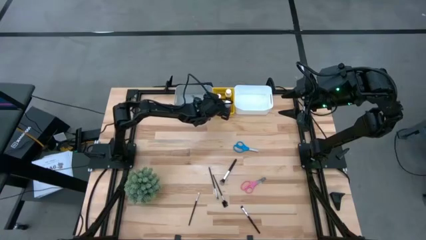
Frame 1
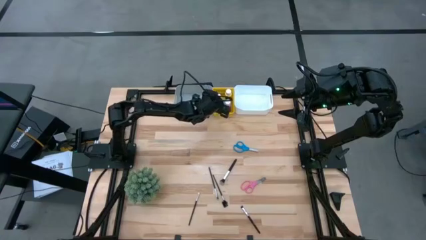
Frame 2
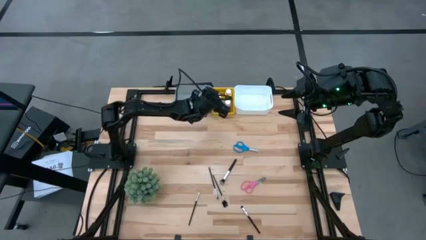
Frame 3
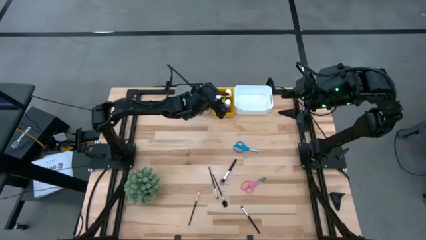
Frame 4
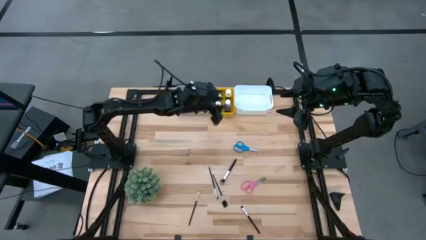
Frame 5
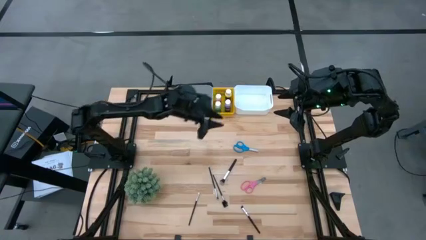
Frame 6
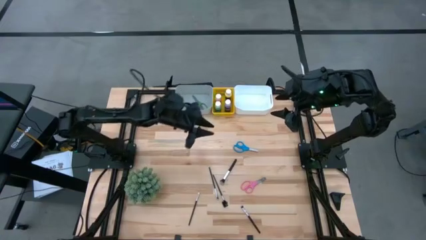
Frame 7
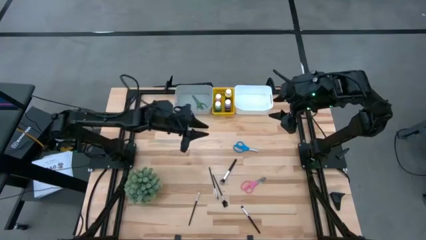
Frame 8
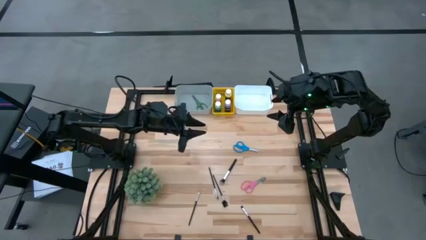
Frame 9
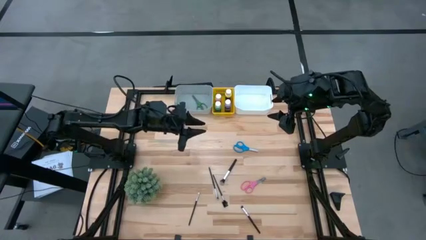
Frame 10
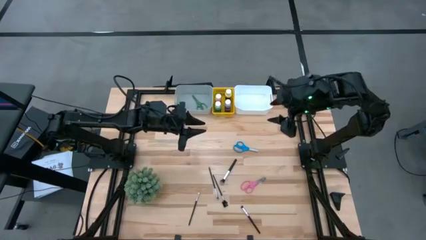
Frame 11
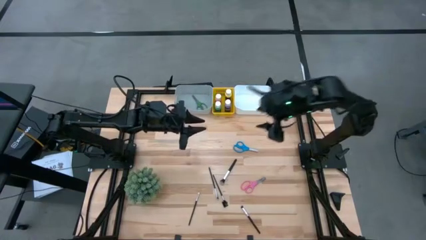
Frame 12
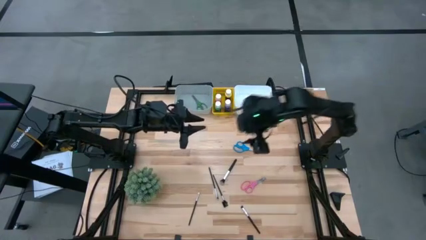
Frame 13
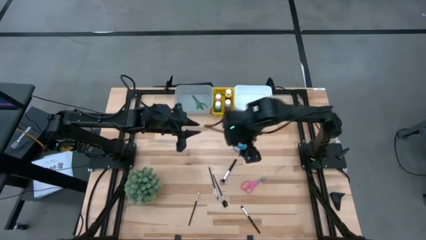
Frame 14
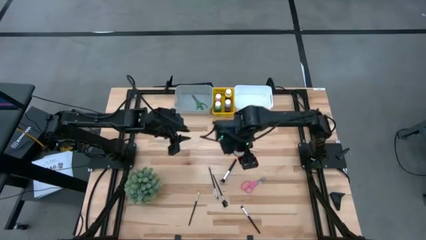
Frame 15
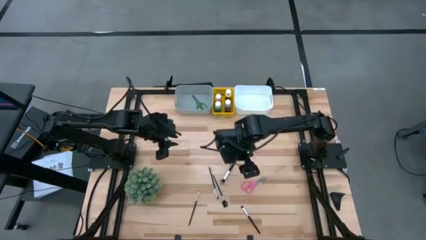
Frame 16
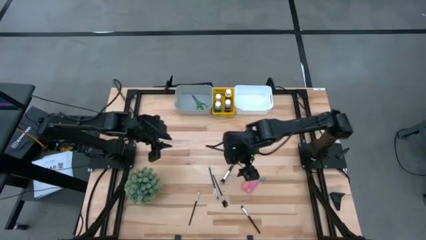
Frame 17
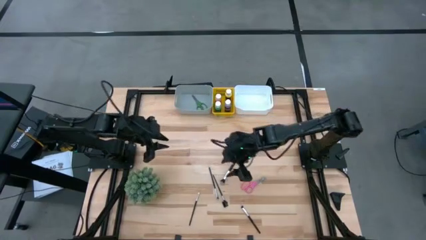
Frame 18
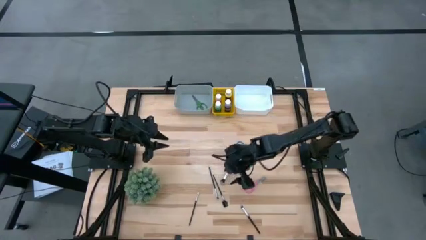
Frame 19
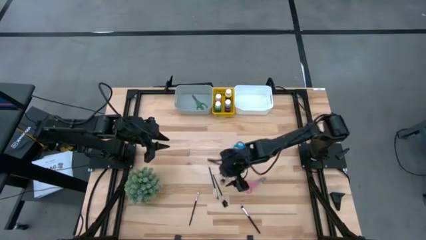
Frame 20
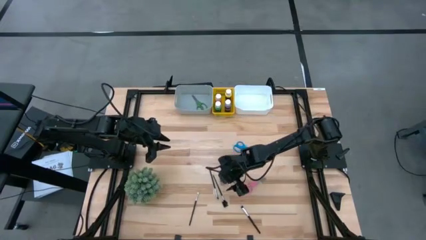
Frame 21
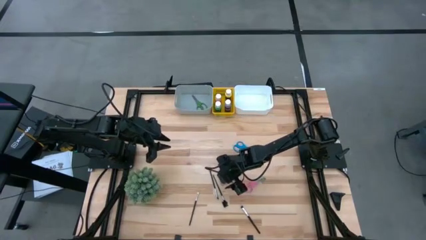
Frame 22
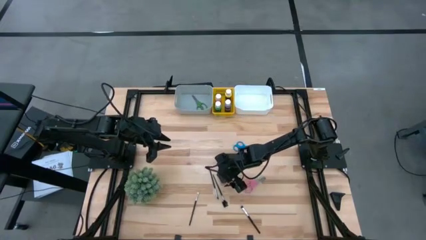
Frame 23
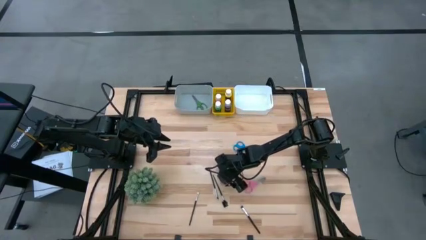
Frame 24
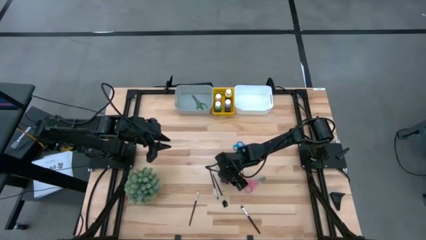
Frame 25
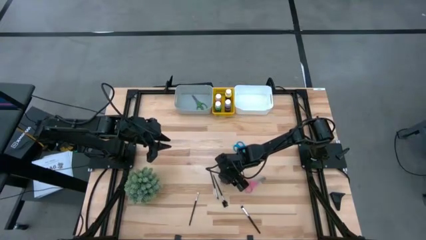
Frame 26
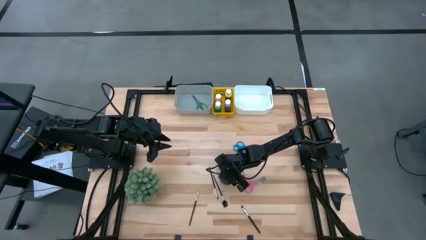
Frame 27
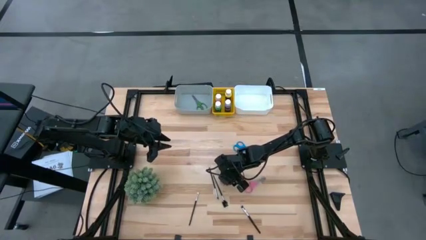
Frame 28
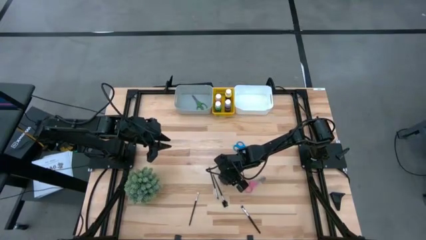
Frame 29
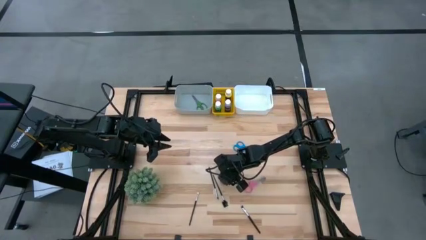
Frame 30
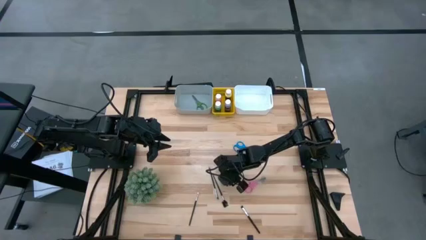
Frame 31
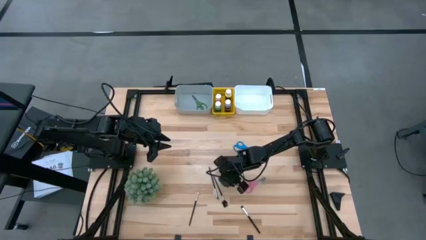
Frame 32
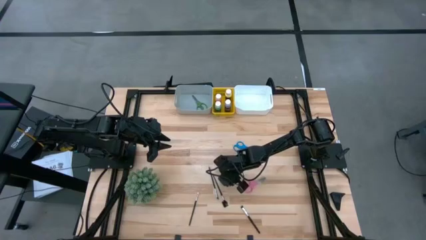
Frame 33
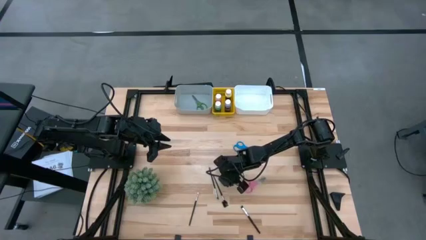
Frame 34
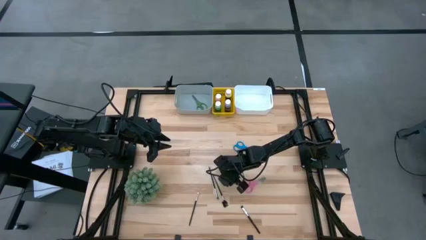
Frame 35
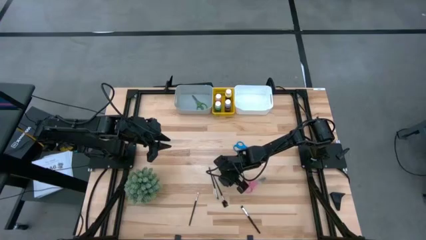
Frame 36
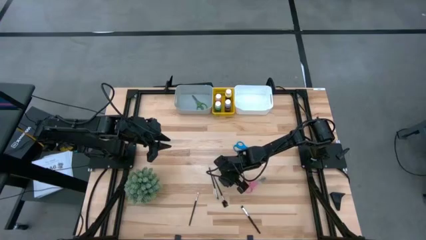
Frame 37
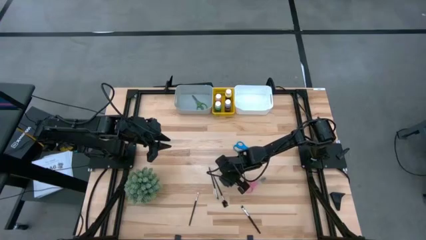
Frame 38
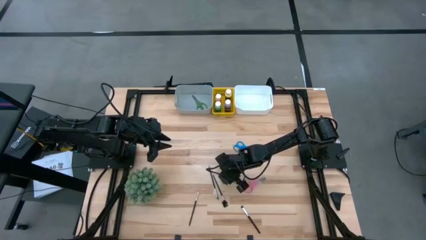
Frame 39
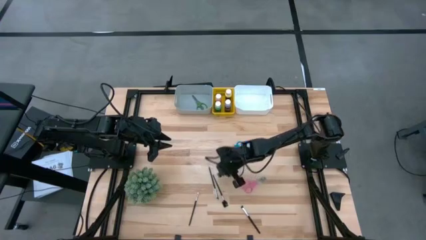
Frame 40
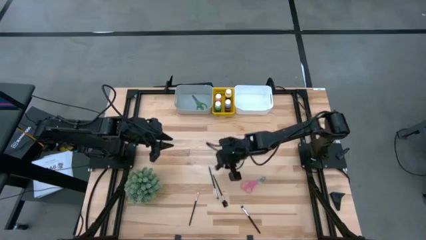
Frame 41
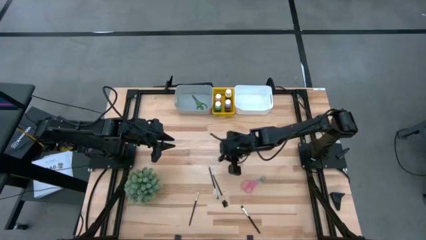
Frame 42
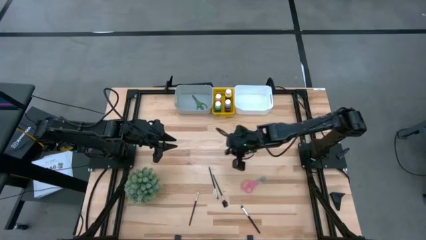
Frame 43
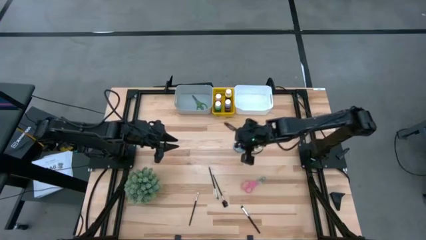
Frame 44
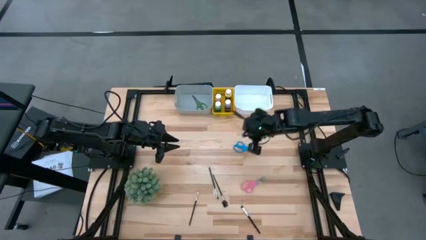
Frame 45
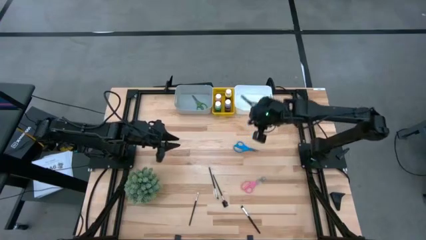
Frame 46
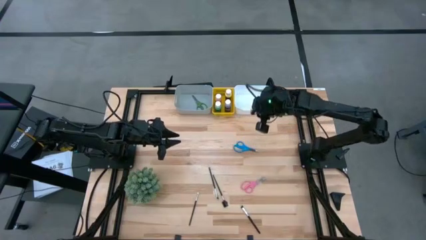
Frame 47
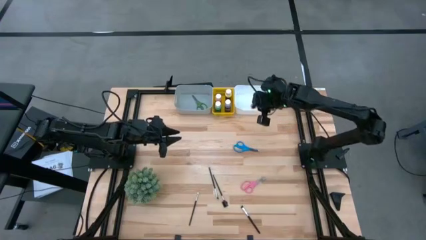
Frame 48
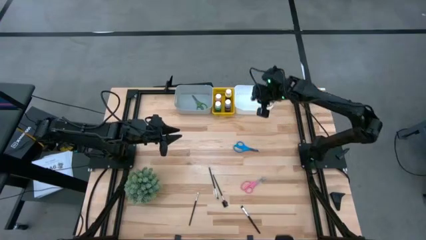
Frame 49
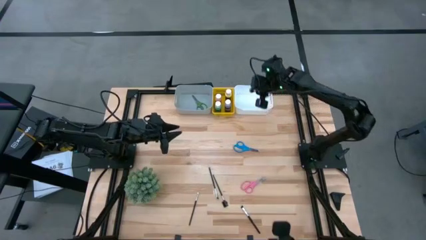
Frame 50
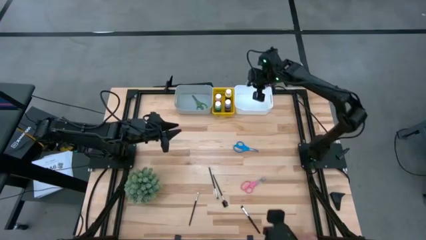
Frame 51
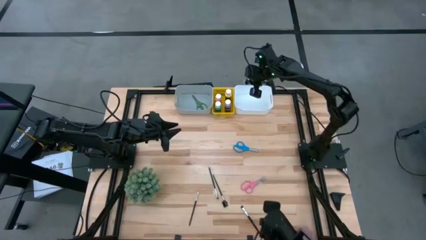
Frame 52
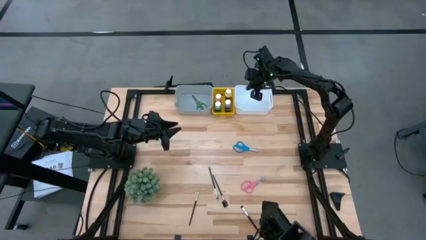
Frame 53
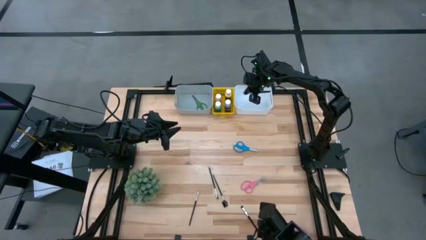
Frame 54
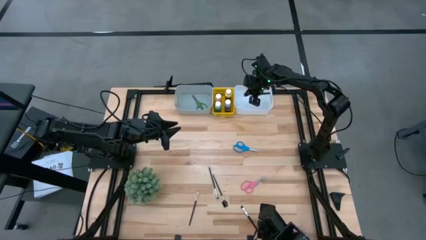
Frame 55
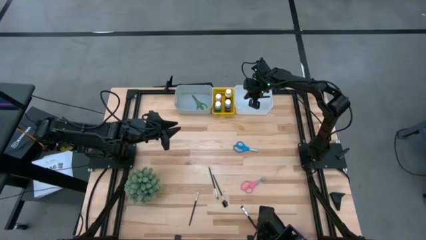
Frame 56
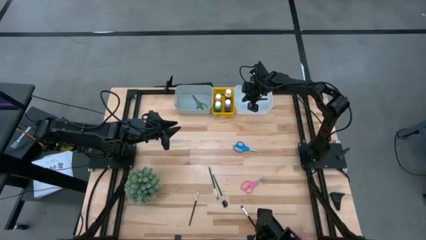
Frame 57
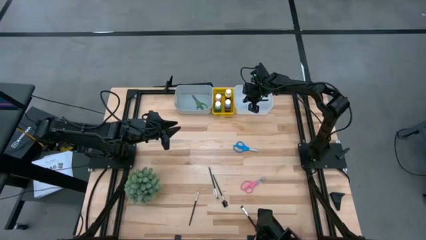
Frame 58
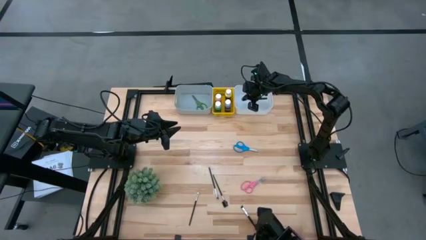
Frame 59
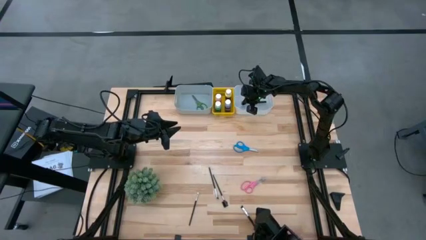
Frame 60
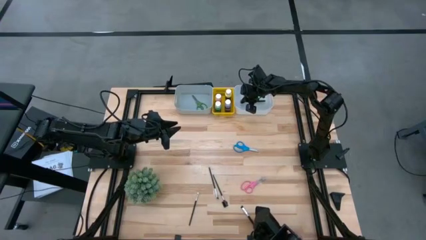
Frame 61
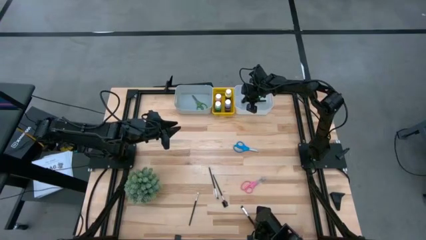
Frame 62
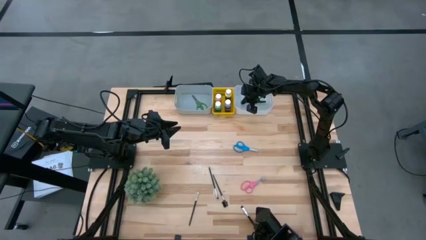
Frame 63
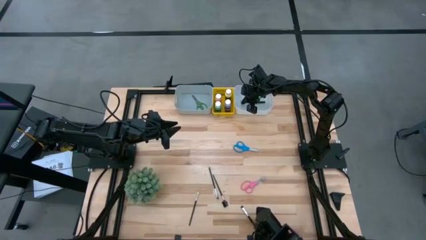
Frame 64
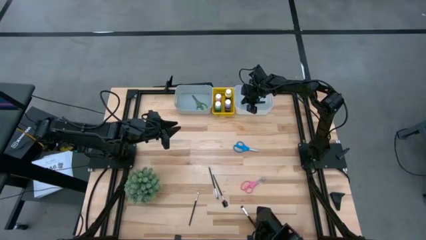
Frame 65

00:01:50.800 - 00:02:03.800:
Task: Pick & Place Paint Supplies
Put the black powder brush into the white bin

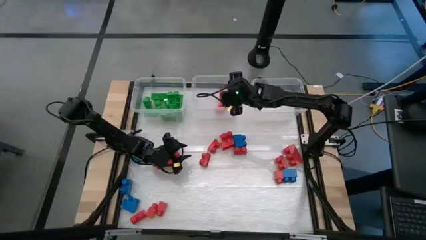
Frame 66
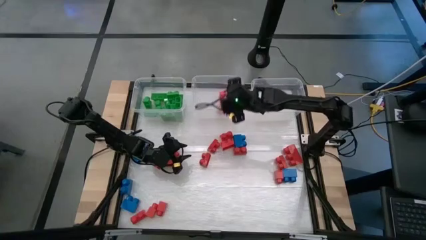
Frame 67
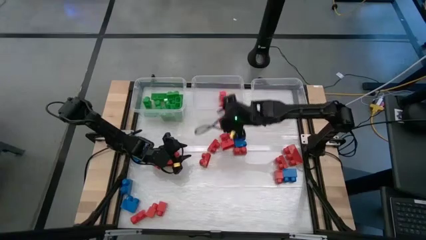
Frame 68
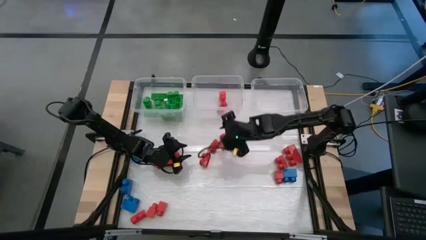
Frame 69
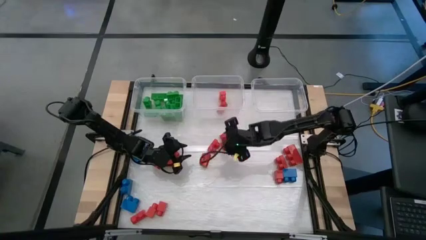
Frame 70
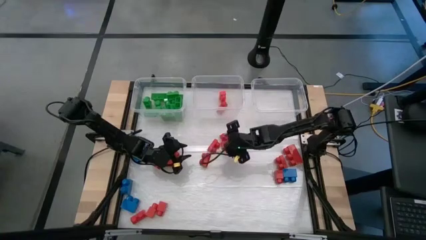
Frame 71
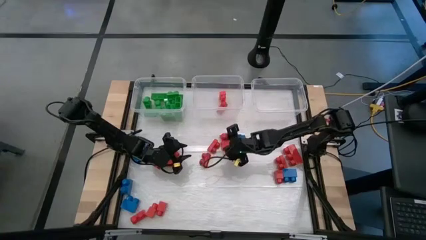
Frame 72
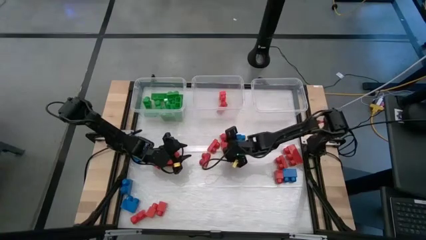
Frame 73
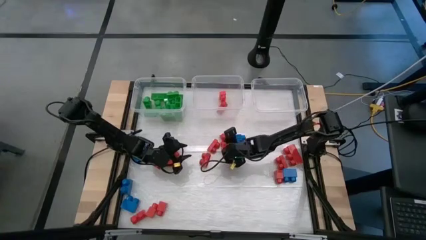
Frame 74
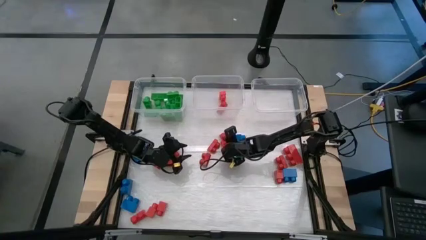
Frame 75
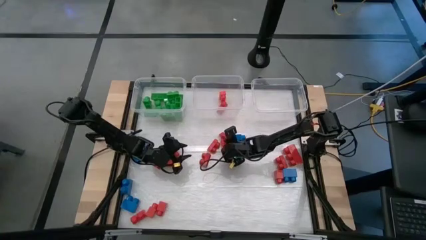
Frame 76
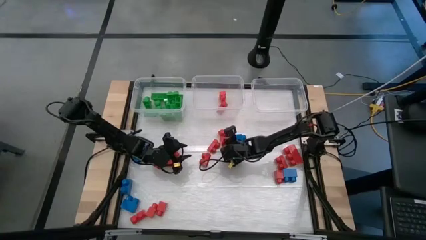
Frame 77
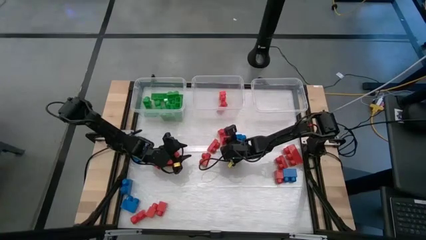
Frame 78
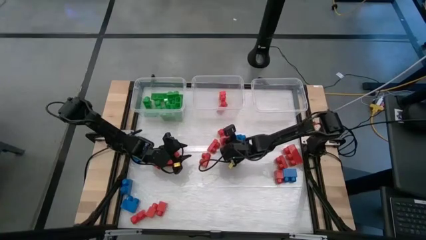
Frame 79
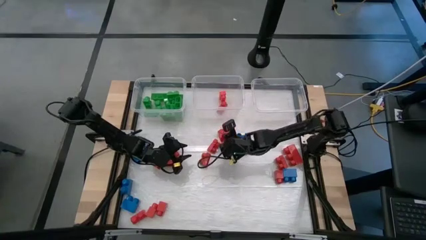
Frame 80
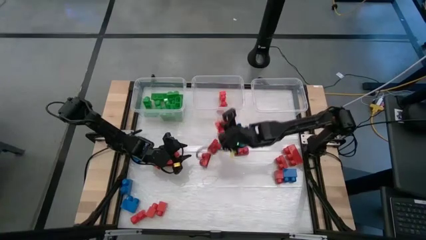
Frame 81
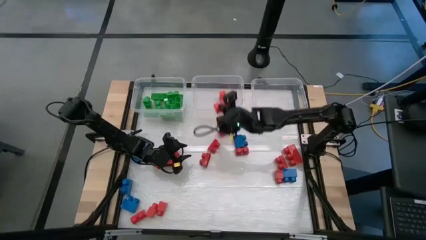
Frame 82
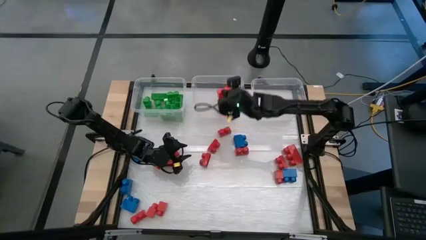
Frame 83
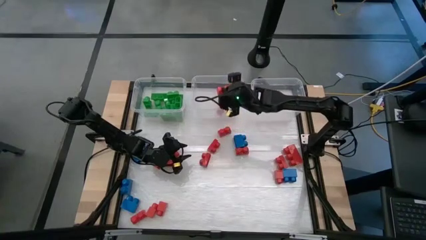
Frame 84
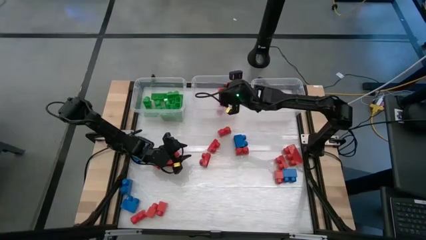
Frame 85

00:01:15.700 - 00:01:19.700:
Task: Sort blocks
Put the red game piece into the middle transparent bin
